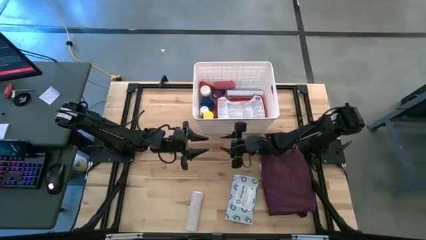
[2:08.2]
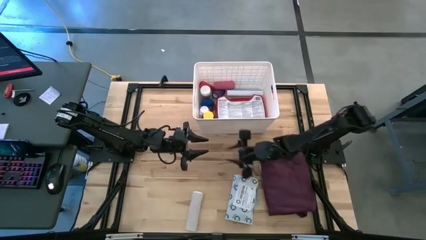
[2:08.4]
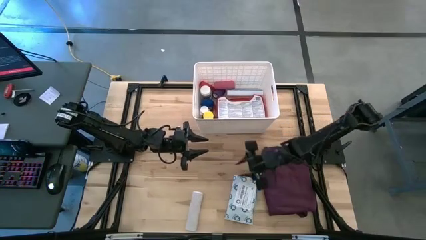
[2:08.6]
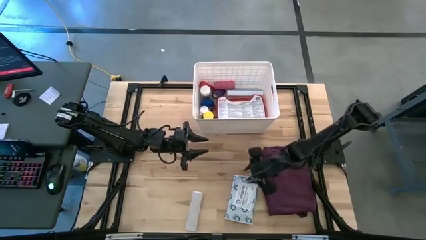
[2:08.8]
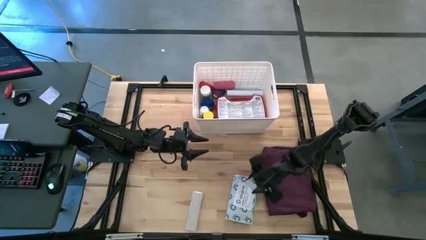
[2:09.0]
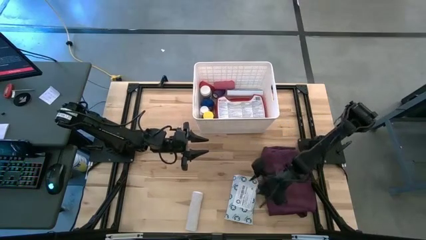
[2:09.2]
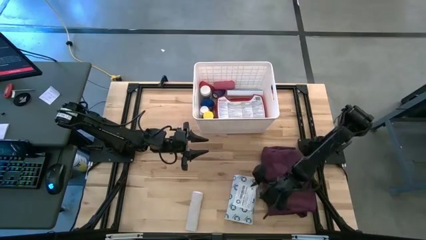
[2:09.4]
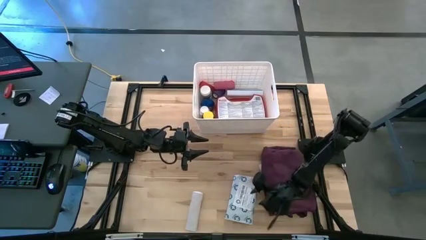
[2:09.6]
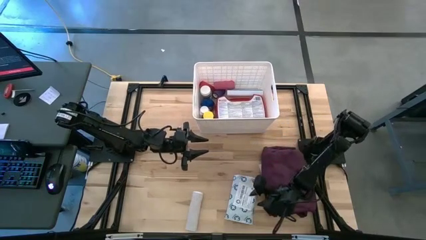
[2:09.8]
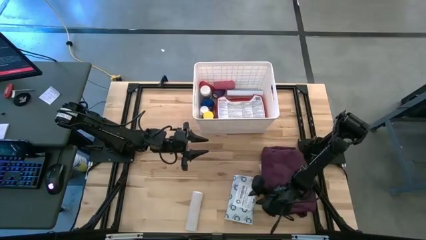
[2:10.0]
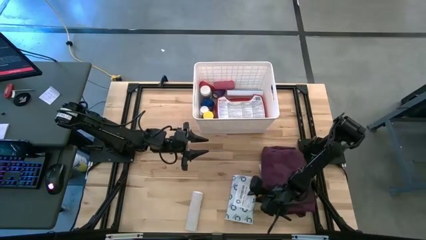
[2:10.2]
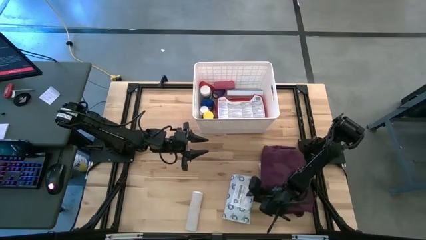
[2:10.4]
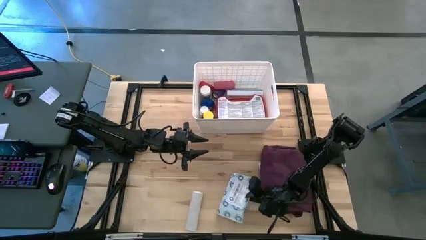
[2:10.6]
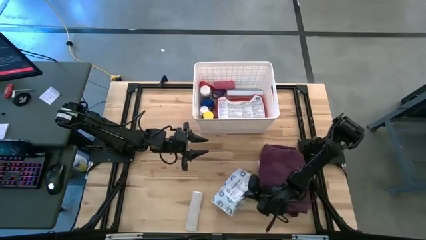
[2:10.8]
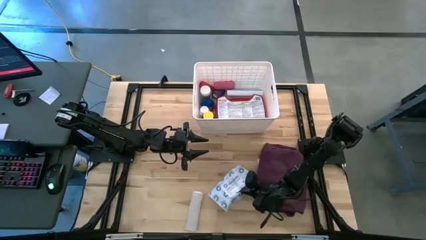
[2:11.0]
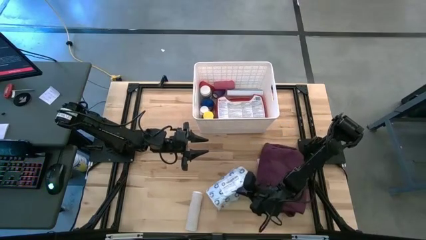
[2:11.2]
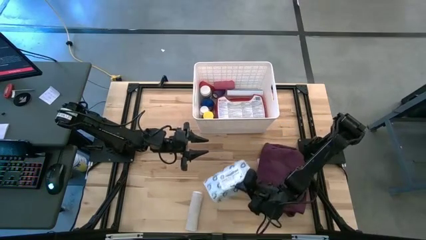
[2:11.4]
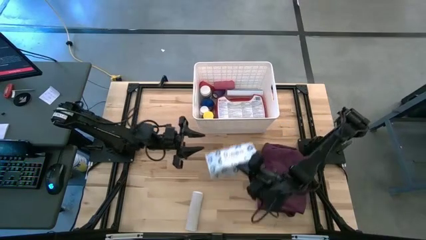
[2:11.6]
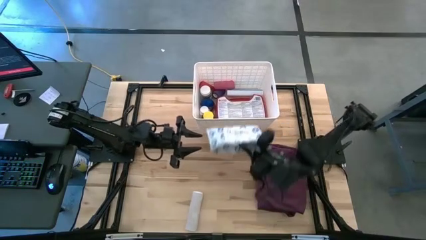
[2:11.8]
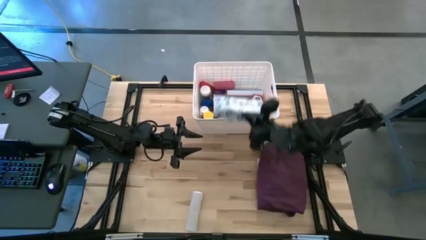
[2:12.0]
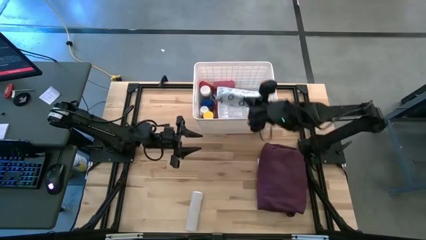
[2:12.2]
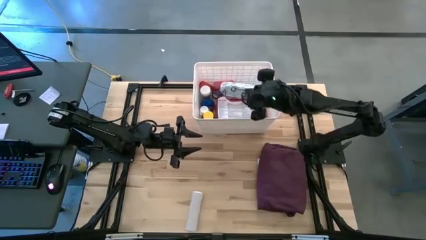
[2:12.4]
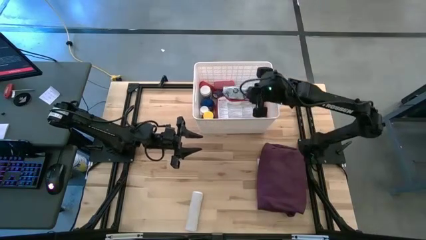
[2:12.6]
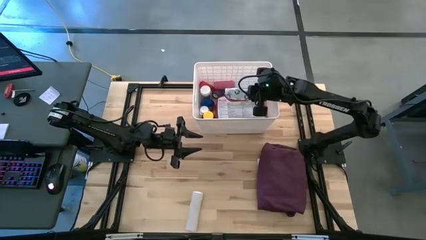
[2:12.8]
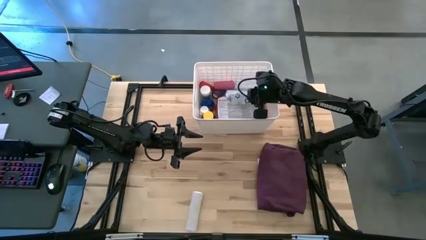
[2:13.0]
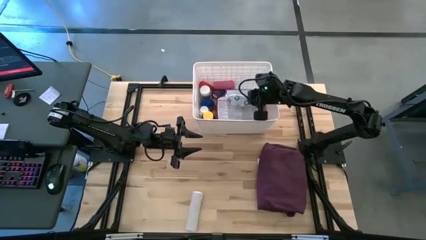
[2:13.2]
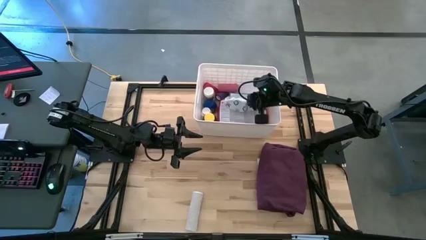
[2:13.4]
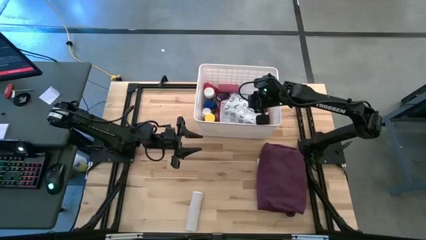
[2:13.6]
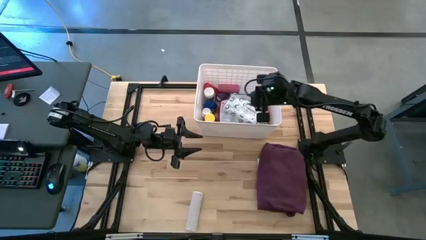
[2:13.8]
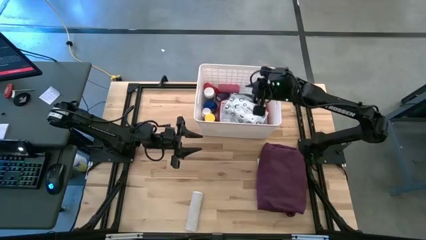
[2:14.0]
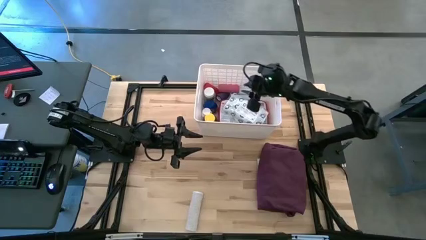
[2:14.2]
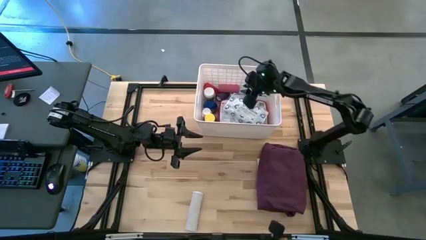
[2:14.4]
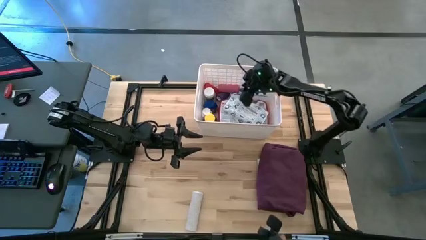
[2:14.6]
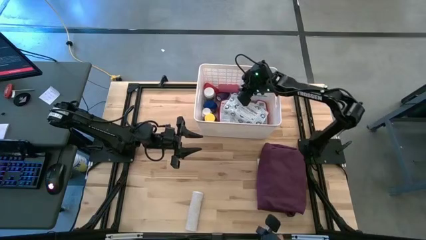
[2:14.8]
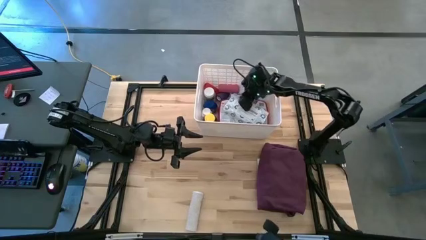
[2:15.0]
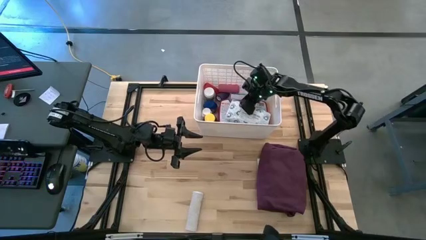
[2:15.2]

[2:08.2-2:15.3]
Task: Pick & place medical supplies in basket/bin
Put the white mailer bag into the white container

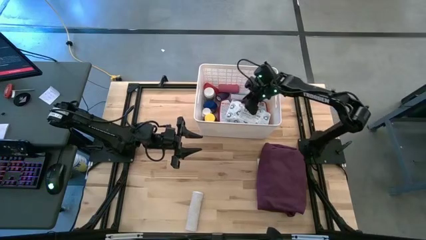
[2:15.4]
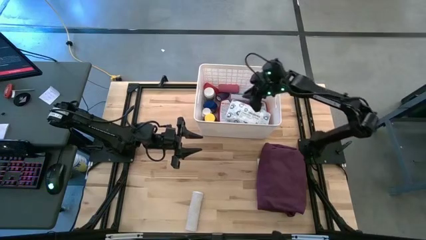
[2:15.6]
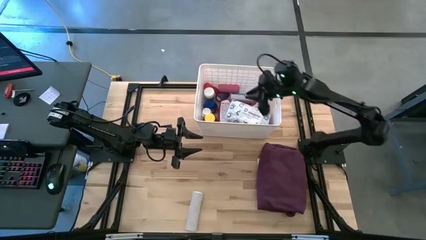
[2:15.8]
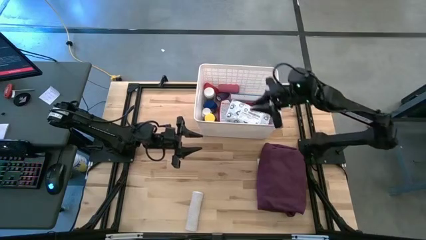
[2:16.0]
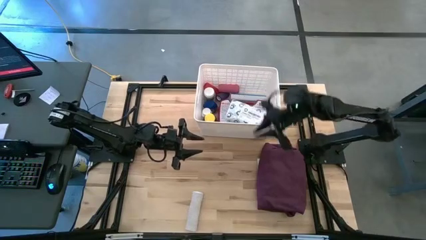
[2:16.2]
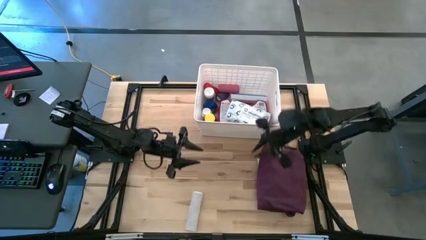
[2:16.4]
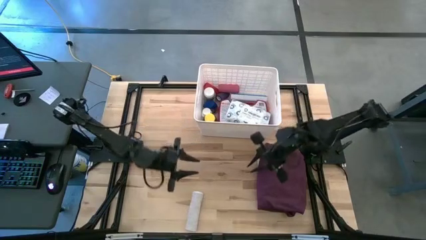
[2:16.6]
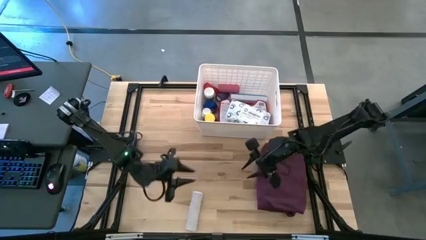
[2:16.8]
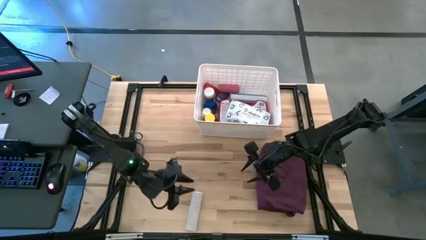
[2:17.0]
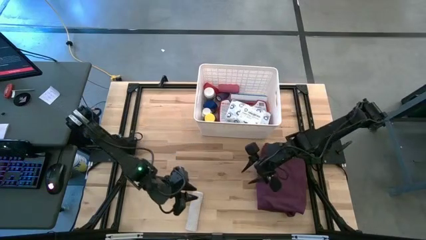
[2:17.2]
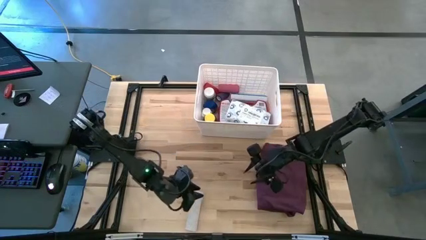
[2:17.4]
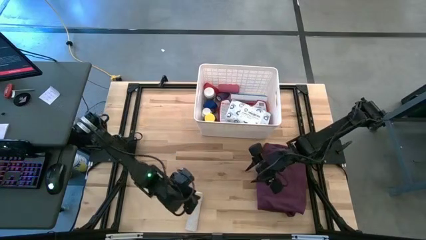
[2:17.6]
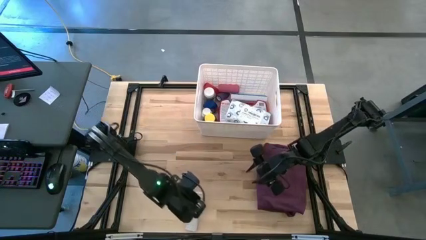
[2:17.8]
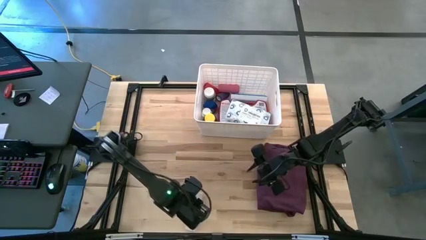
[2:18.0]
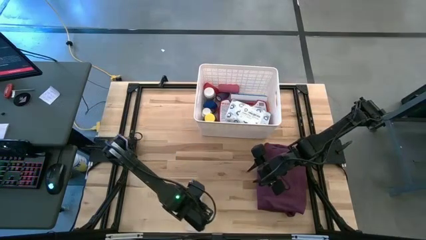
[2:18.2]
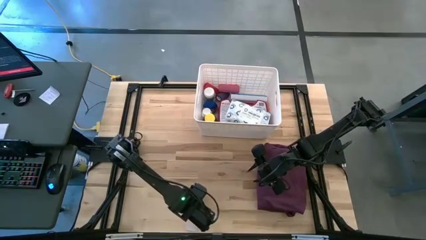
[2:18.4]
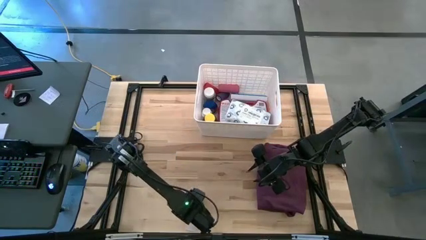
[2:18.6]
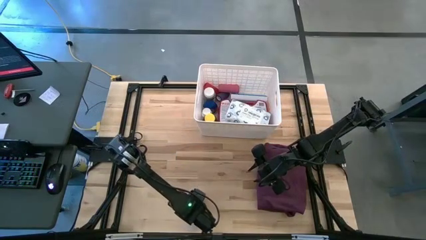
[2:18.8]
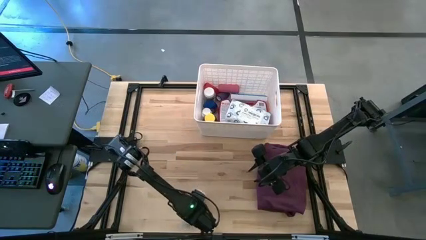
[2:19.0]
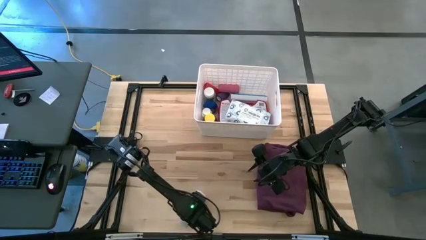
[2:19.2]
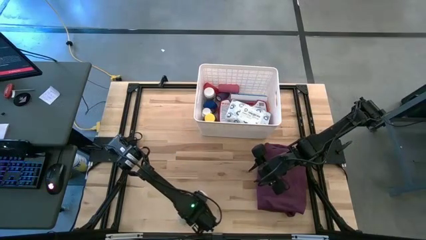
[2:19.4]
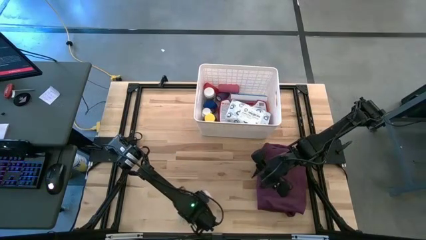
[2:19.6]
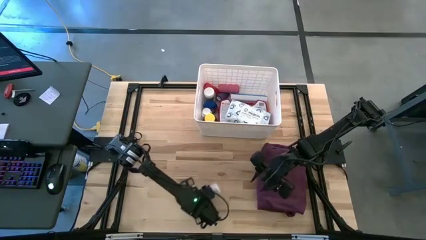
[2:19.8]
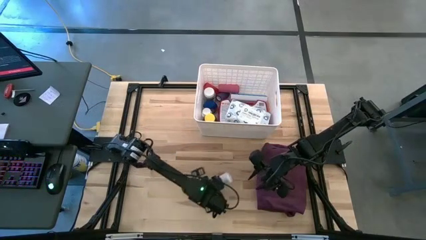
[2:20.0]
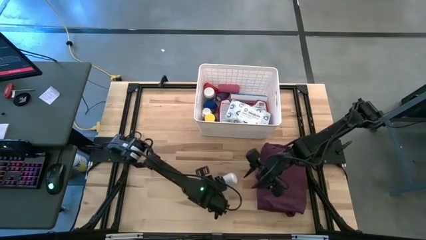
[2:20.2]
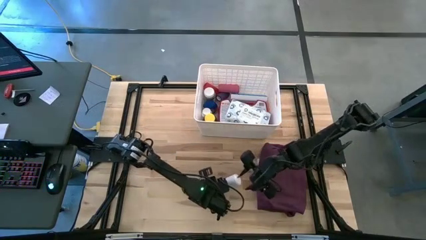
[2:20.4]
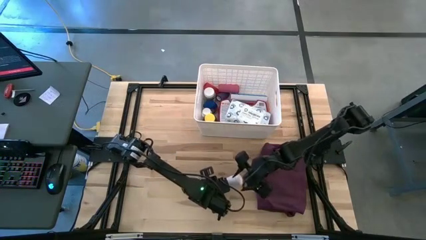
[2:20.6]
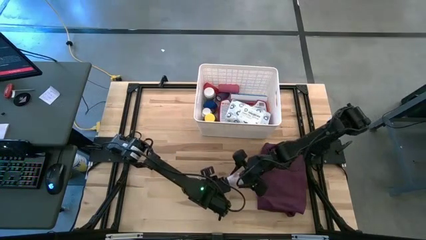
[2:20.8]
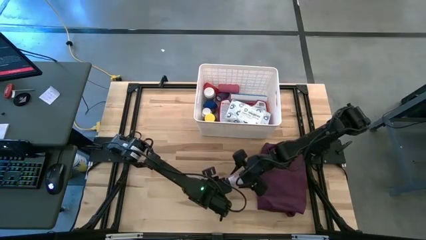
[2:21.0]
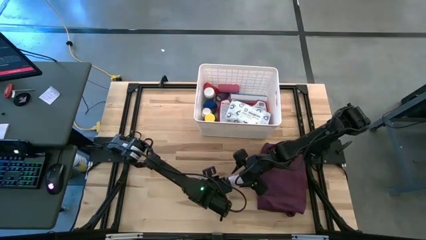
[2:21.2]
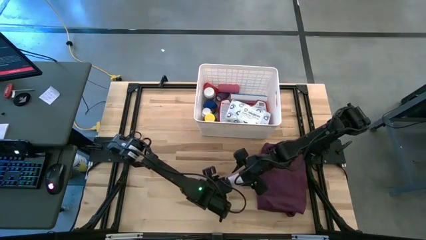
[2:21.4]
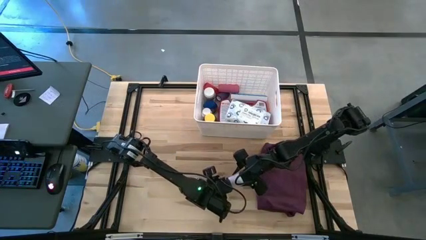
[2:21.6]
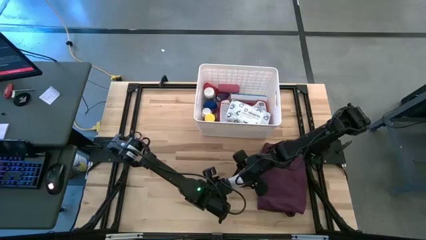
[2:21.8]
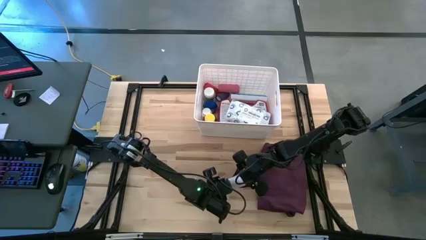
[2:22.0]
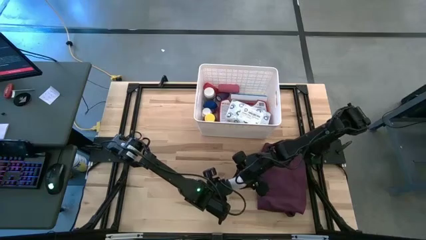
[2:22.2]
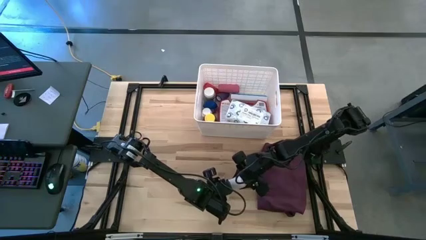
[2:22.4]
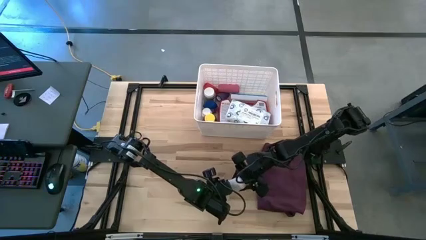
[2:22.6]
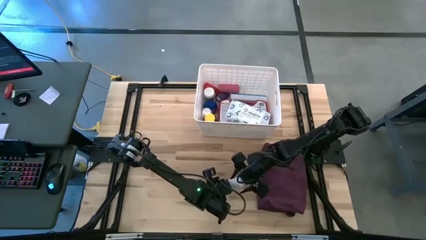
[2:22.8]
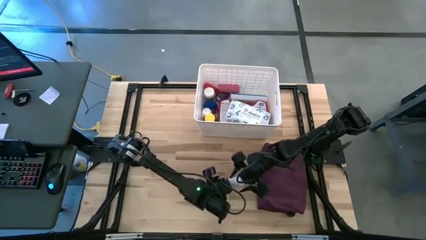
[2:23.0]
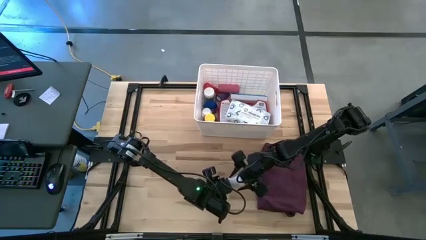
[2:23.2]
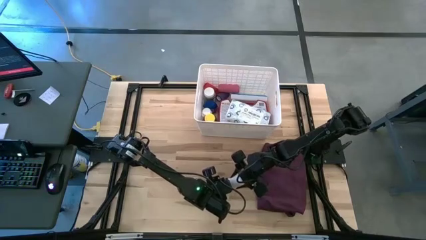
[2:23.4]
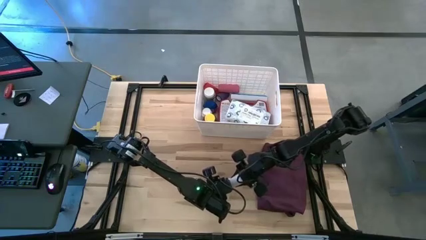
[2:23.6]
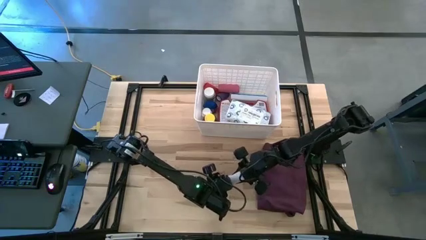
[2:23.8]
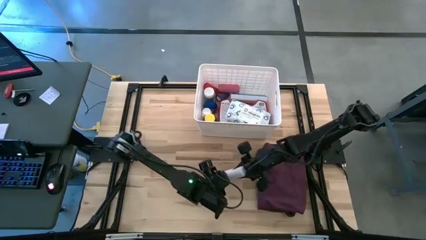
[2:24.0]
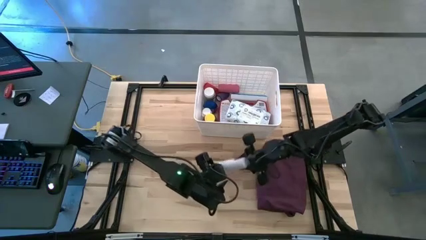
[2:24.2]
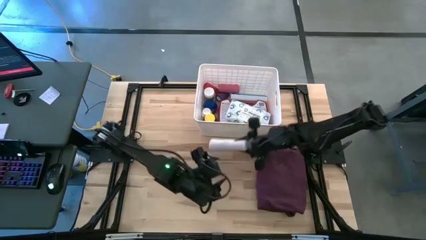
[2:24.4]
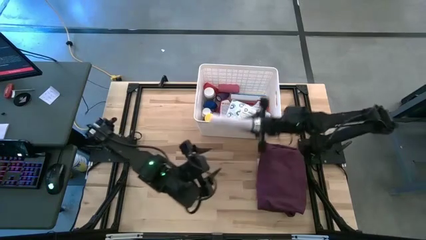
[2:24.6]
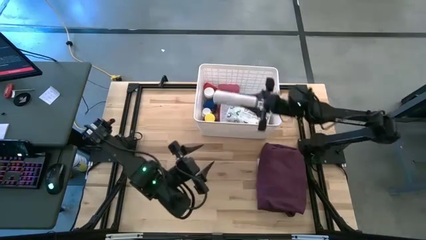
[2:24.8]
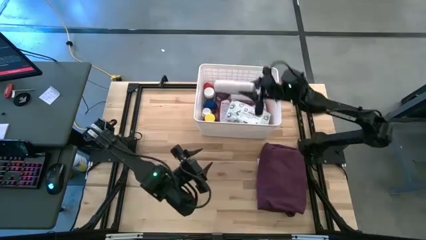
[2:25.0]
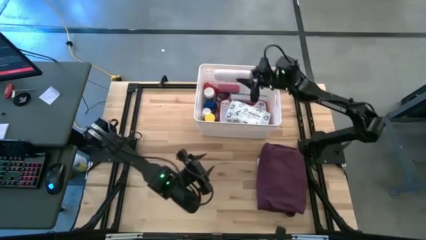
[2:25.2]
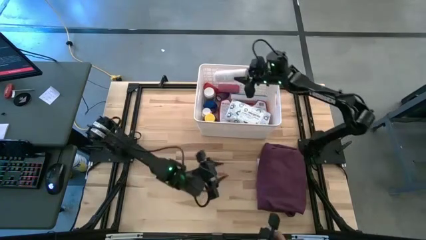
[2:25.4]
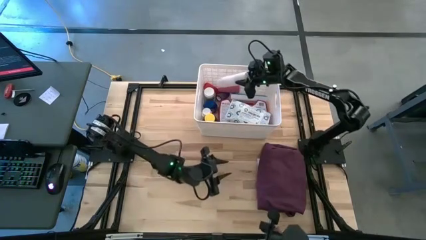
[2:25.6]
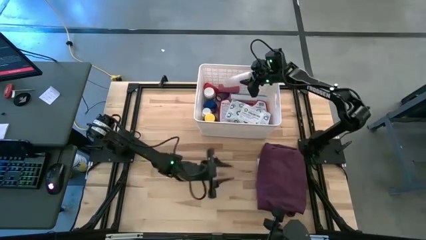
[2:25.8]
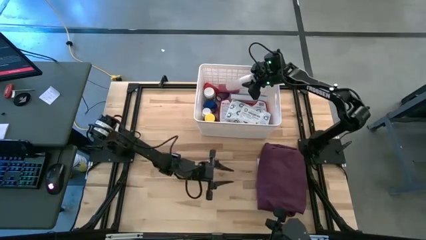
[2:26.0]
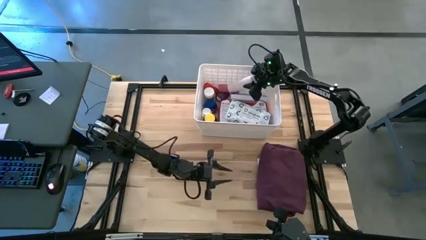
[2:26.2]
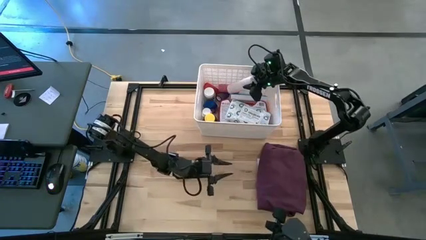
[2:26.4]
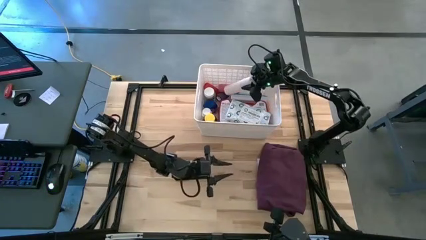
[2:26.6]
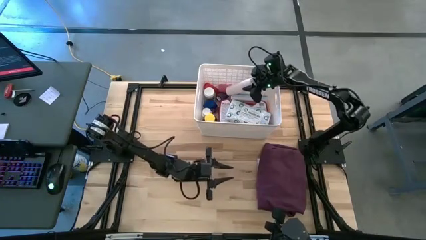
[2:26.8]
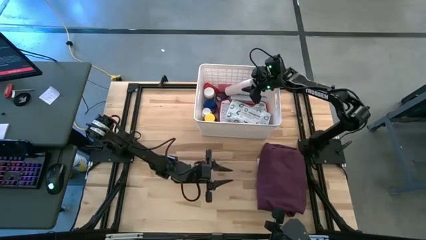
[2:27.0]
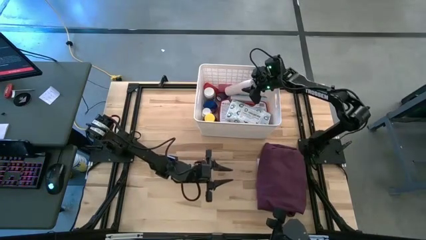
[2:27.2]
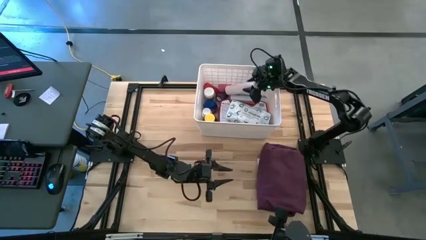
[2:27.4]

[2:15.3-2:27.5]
Put the white bandage into the white container
